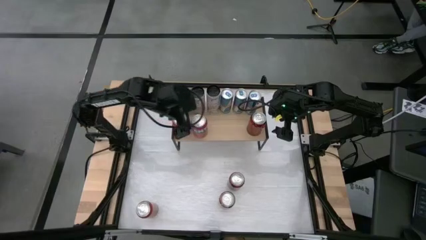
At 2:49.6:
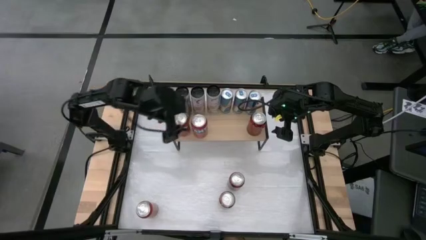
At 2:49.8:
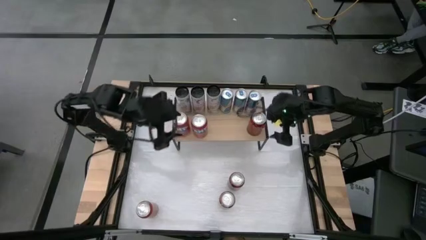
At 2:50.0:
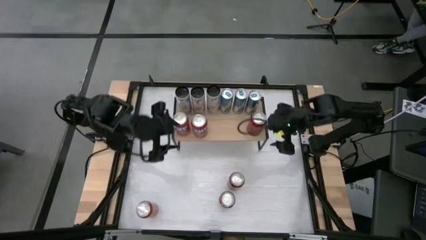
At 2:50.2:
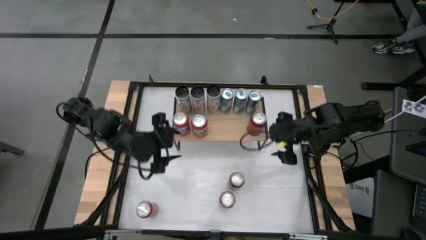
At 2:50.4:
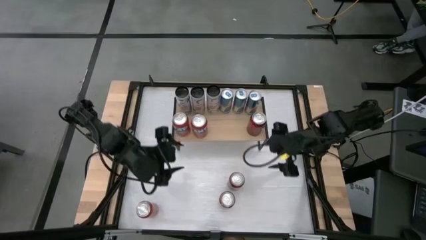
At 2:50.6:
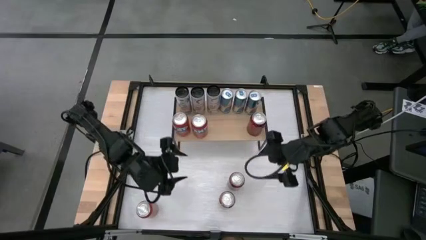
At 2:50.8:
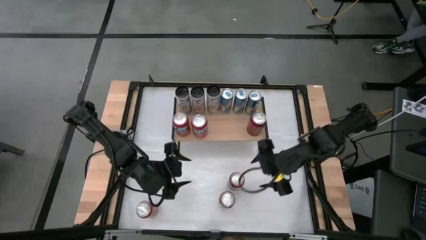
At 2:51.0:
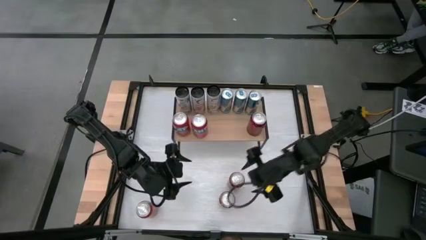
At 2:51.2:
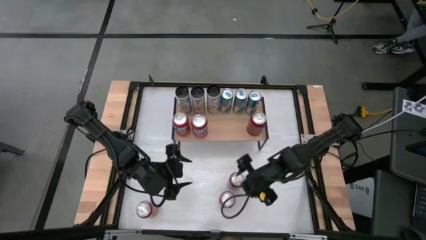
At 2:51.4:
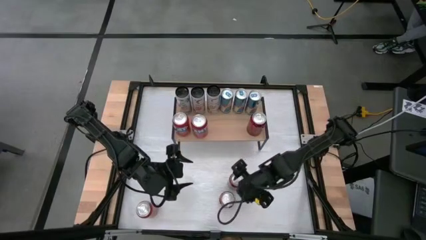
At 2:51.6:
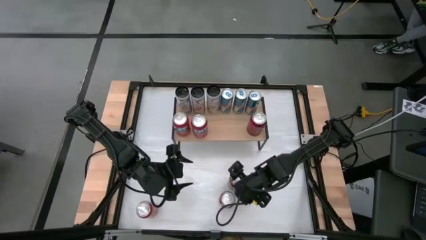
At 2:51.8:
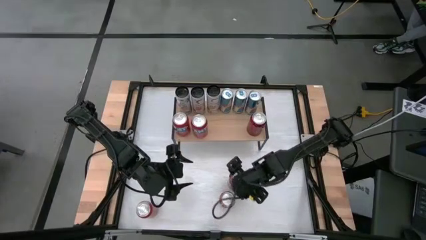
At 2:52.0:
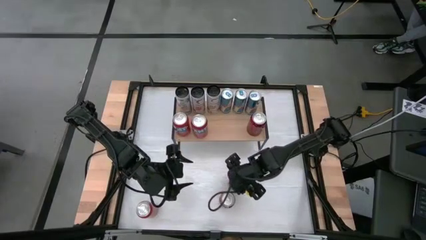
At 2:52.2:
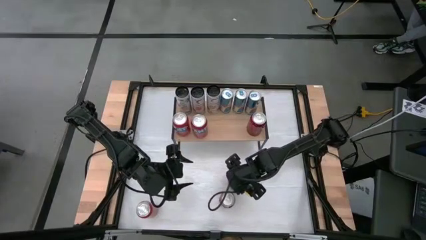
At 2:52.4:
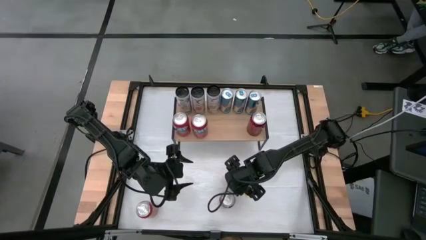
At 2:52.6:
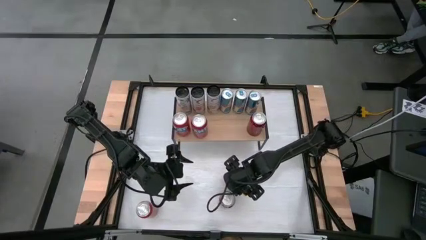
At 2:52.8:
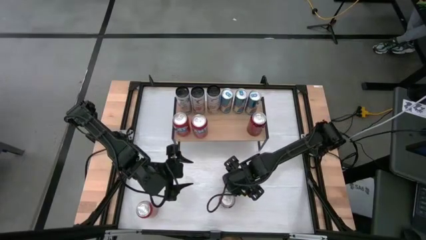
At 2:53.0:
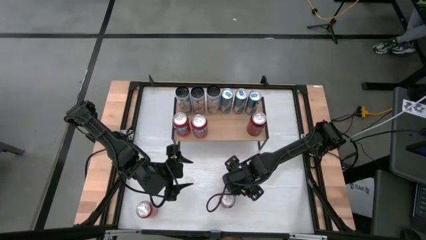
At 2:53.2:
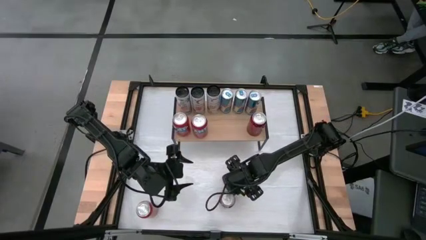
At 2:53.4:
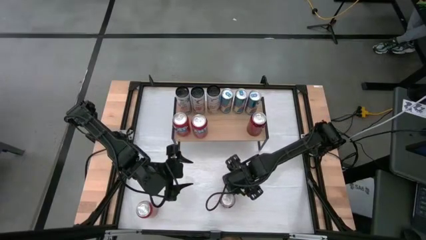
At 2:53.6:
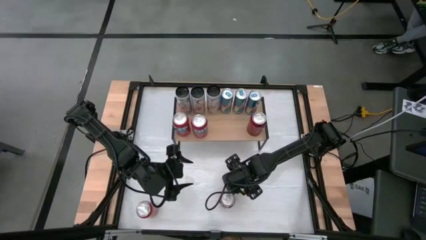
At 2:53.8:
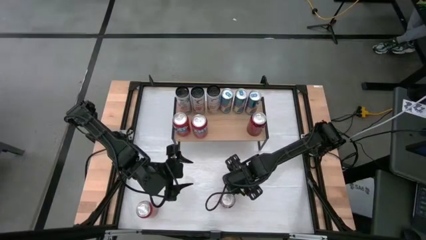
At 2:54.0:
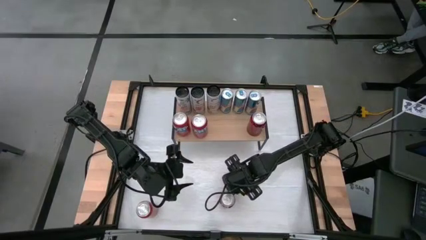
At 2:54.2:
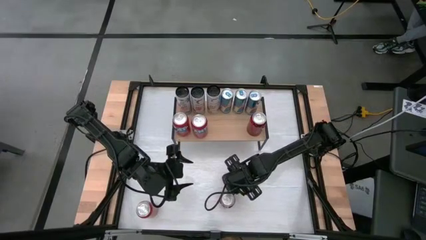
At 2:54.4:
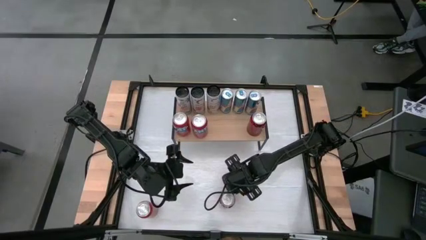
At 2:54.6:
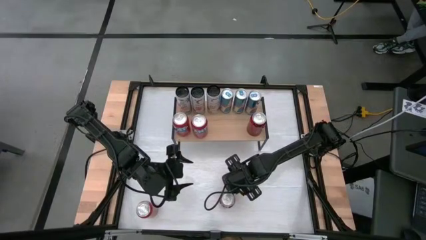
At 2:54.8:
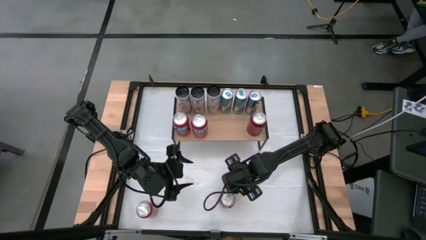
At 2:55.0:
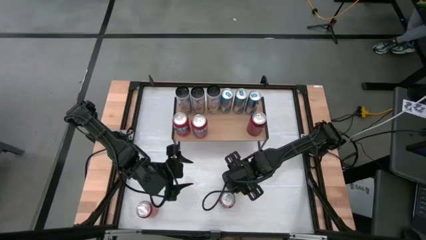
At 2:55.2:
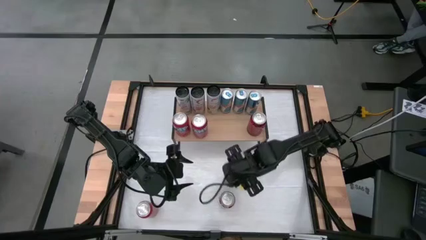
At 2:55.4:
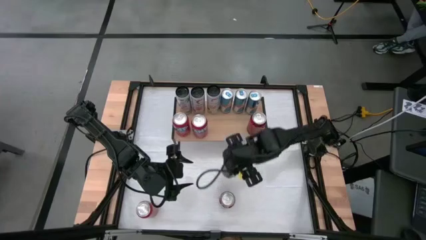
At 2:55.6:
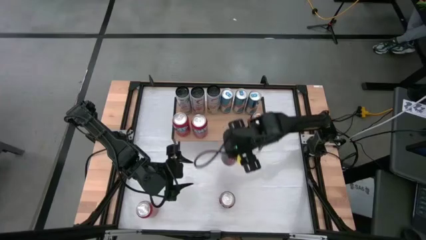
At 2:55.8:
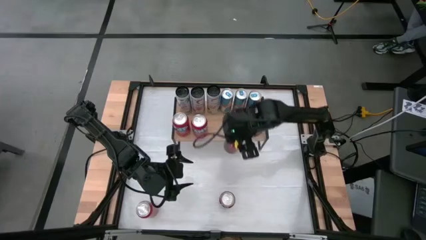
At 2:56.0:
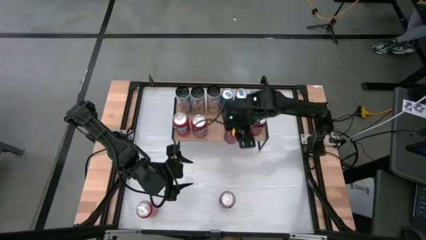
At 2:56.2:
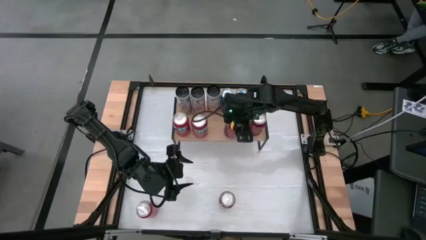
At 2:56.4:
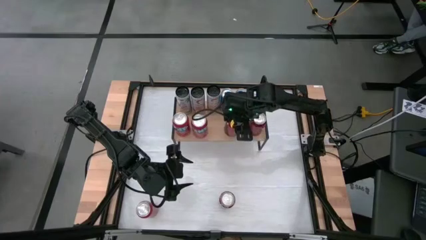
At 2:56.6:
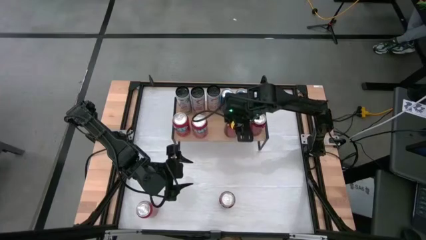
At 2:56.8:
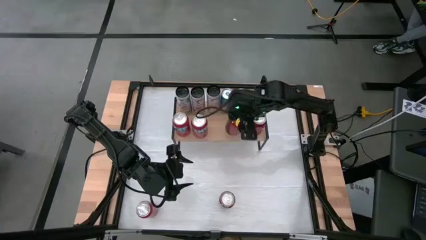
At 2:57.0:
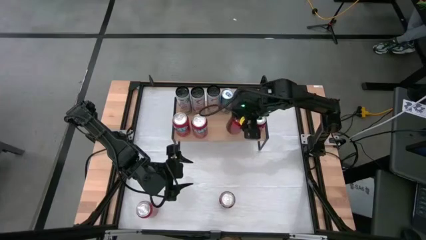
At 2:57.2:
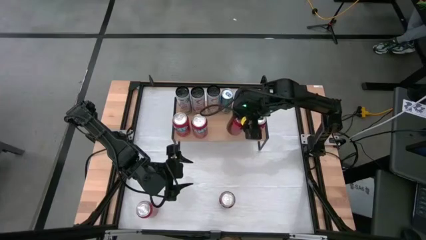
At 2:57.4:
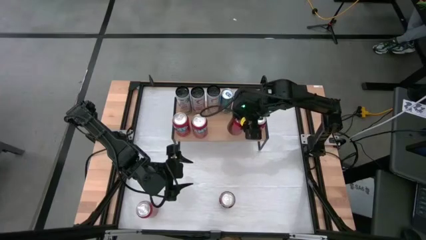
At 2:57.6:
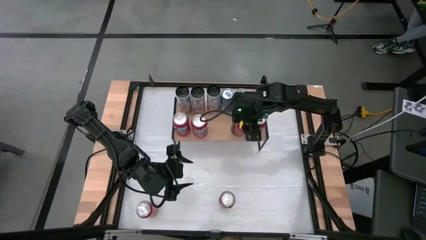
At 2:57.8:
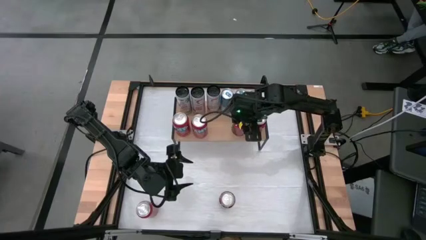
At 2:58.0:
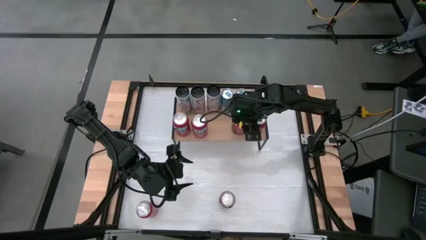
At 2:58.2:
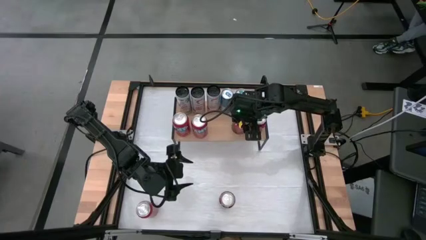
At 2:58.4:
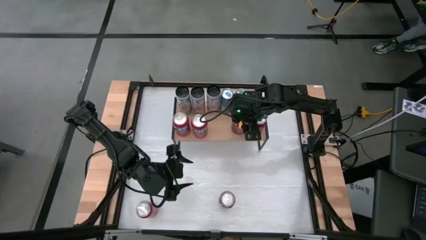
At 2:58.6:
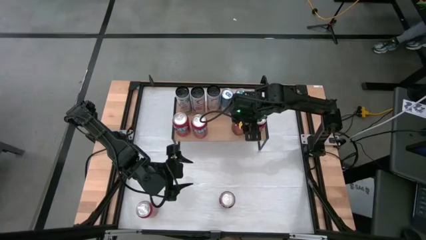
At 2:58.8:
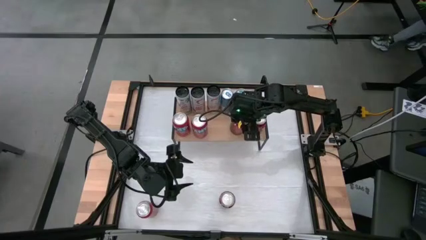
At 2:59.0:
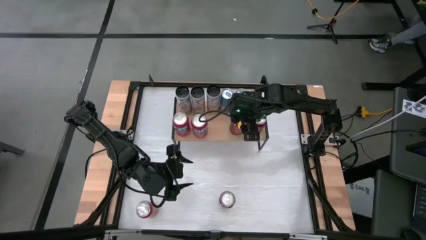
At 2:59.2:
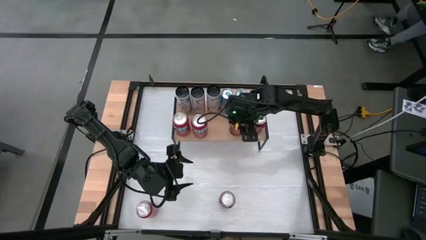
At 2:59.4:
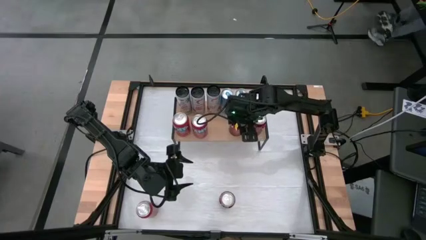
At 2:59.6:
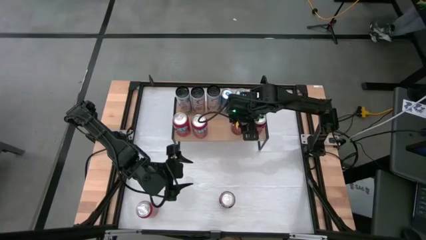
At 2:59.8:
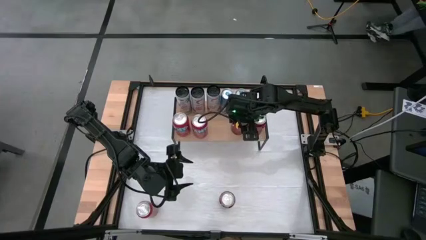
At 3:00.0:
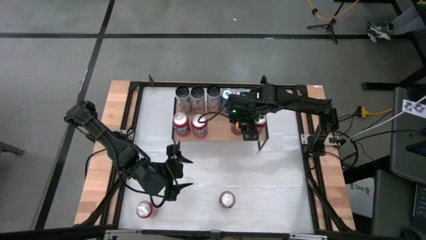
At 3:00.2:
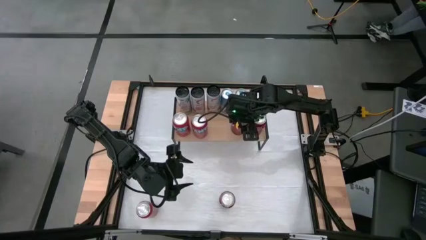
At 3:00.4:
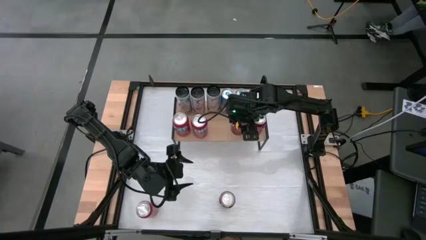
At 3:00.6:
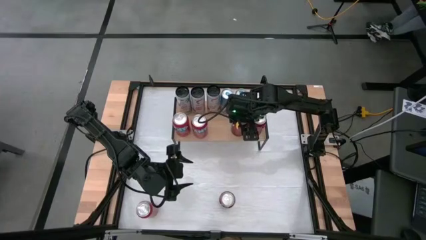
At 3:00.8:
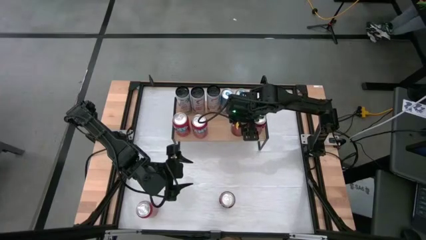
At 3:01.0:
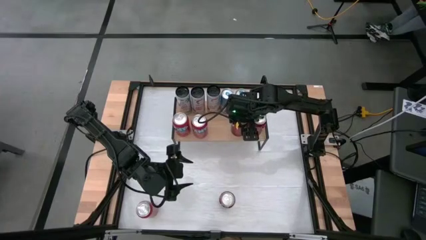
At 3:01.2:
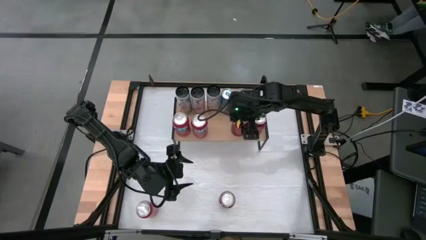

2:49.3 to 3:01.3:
Task: Place canned beverage on shelf
Put the top red soda can on the shelf aligned with the blue soda can

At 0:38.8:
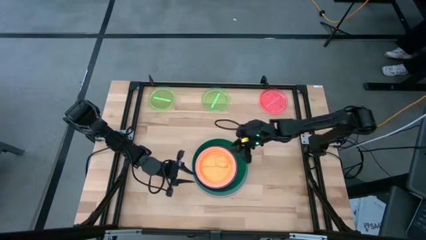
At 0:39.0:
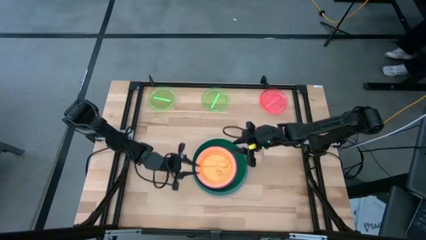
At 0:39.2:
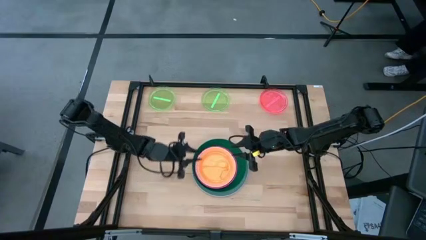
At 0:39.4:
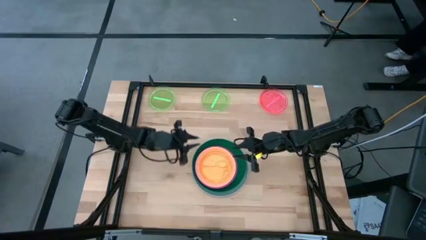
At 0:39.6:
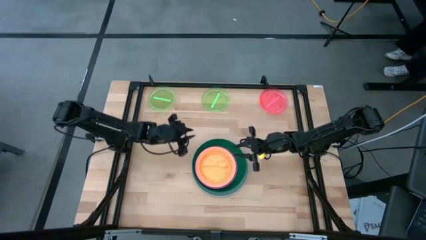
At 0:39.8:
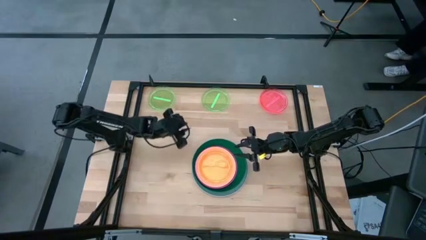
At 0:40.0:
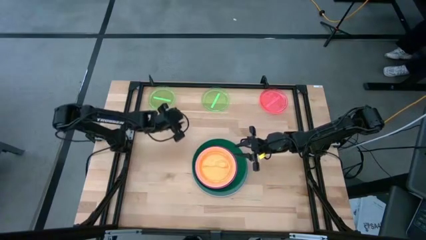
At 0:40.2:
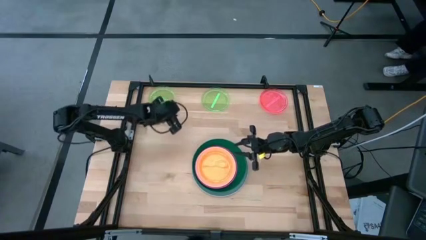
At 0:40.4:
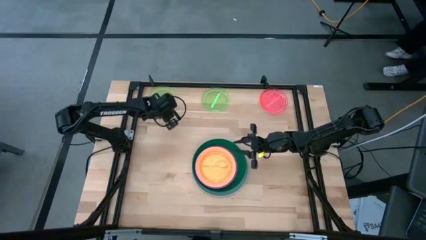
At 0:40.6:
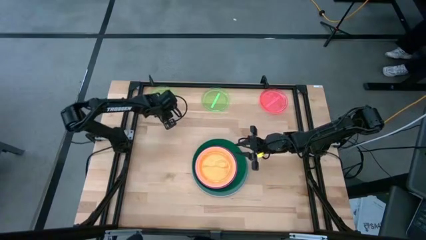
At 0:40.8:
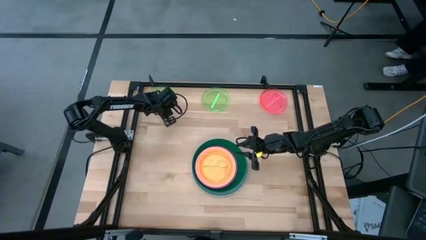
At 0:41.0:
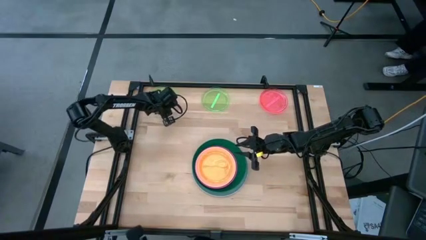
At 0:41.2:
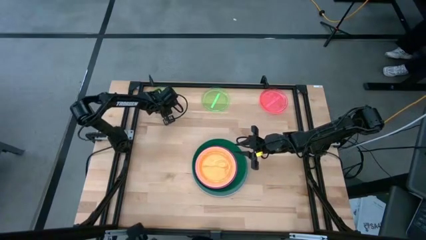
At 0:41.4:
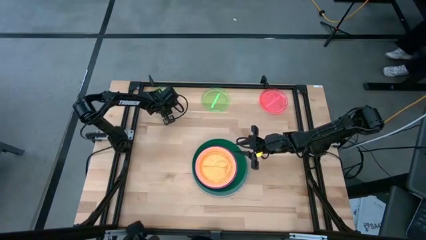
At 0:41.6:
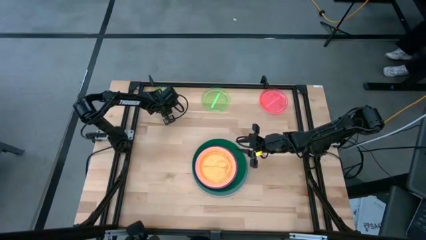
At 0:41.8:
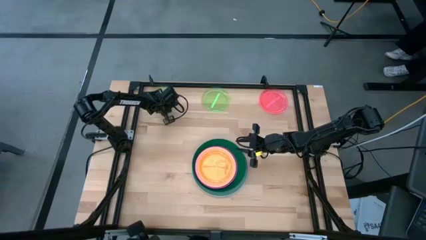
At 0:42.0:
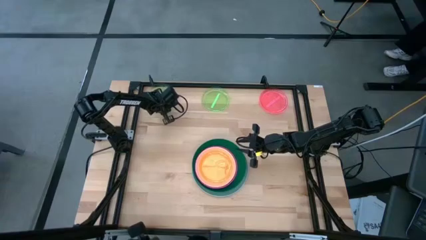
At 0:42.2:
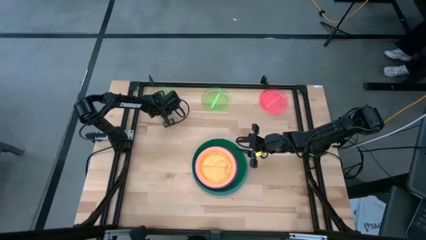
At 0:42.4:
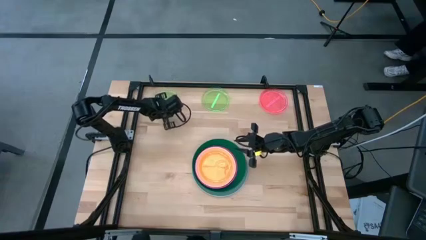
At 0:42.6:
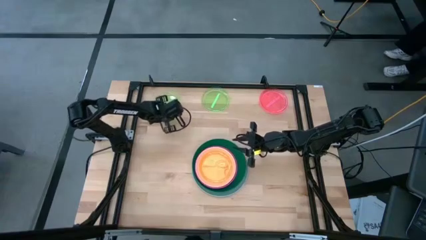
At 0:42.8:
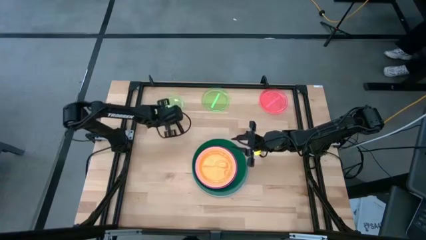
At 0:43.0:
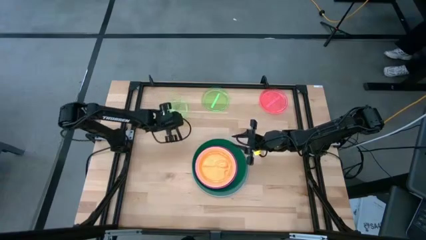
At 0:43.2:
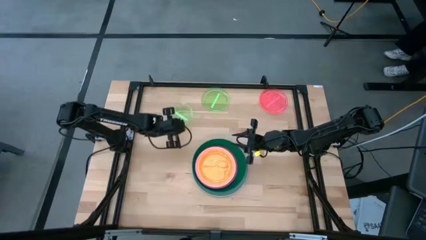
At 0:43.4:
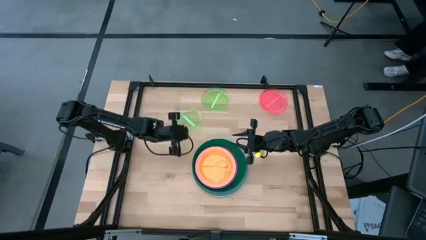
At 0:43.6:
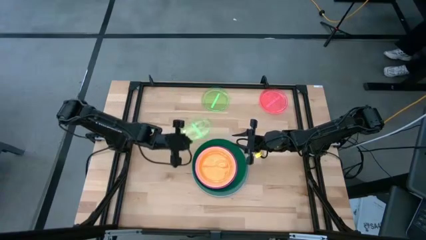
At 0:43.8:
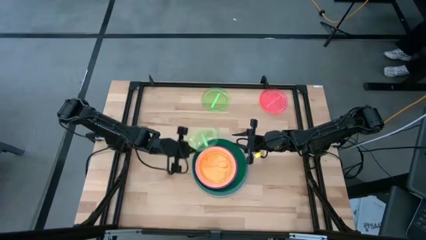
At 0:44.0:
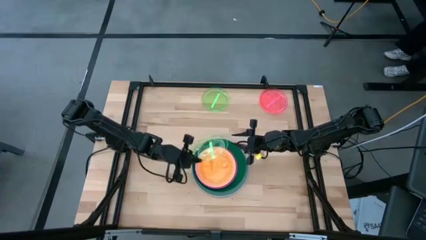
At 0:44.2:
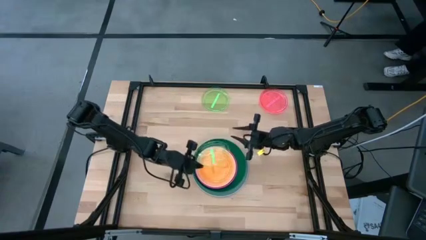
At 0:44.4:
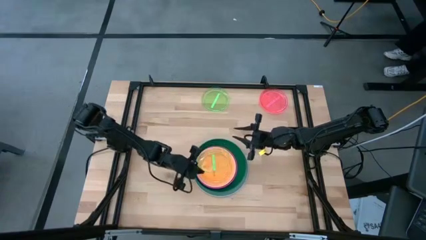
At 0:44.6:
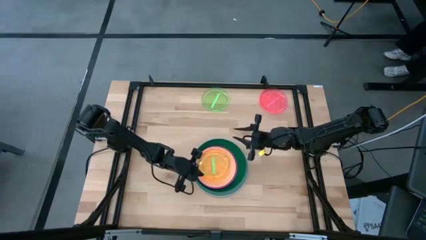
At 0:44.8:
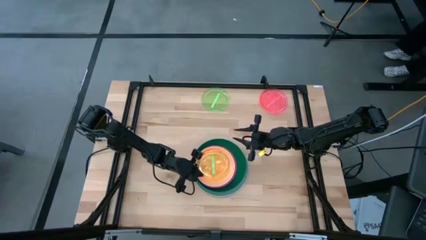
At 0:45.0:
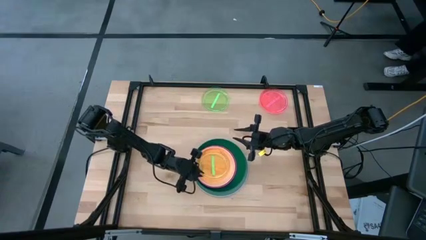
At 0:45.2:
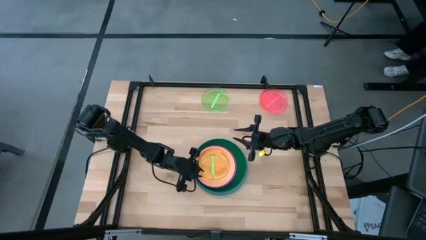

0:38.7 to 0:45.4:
Task: Stack plastic plates
Stack the left green transparent plate on top of the orange transparent plate
